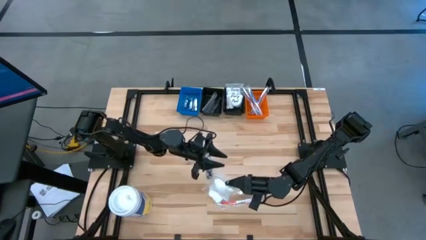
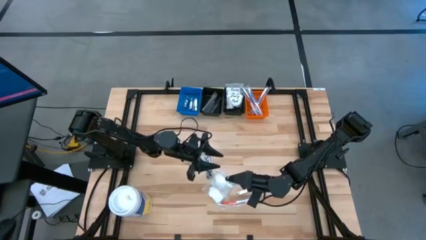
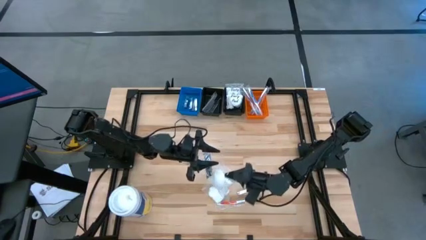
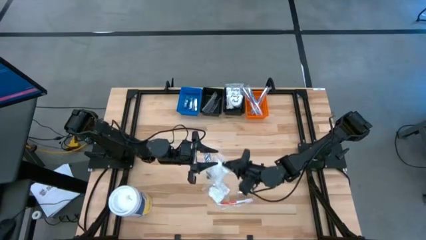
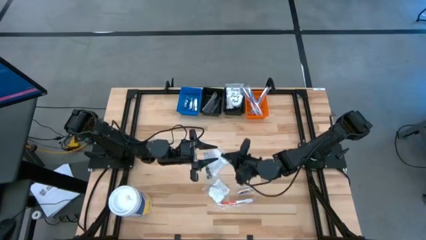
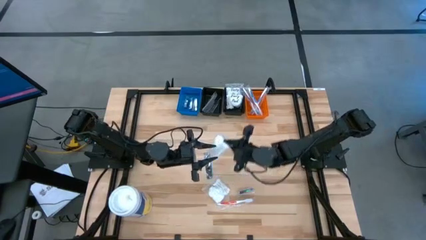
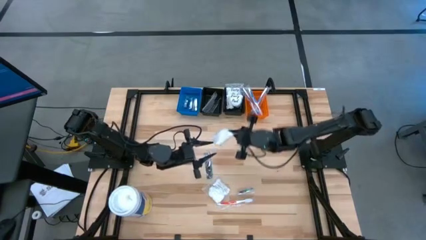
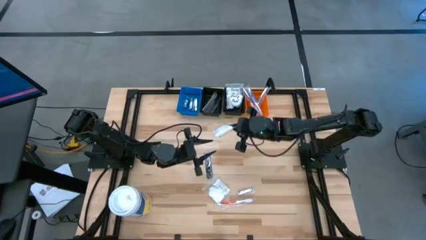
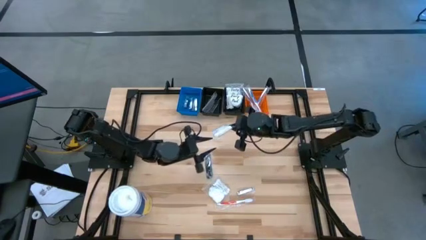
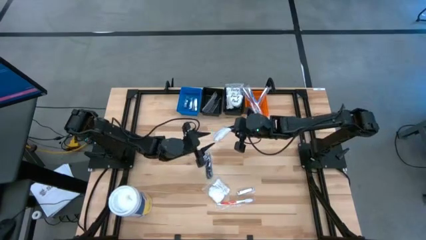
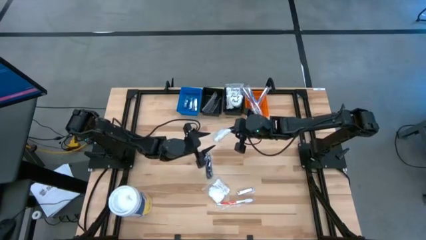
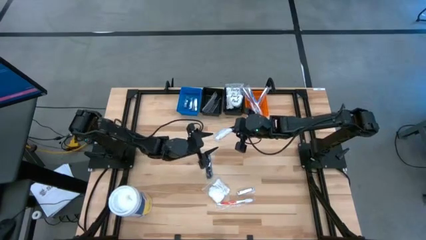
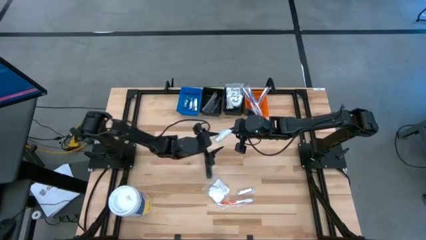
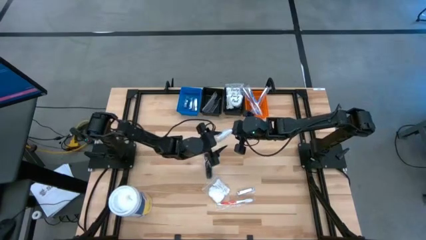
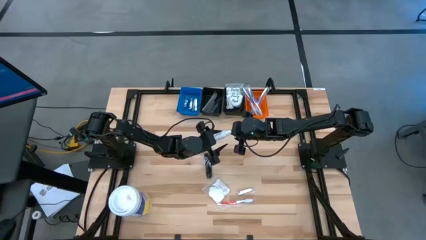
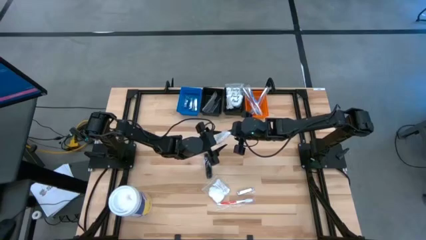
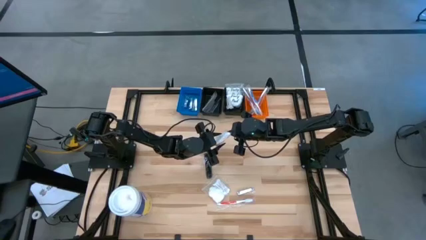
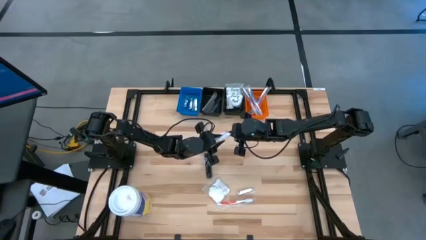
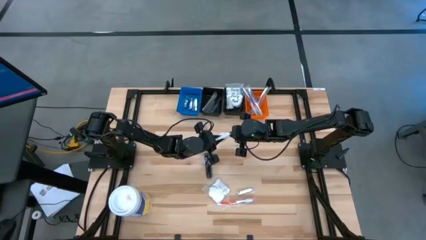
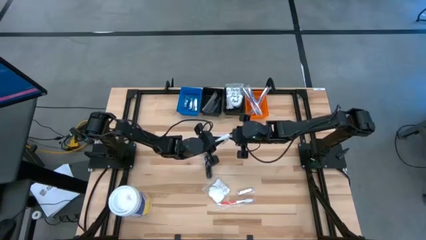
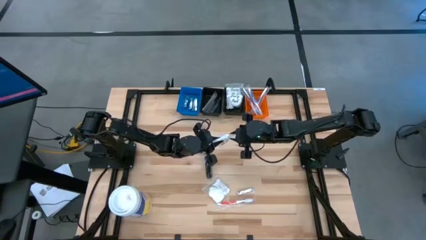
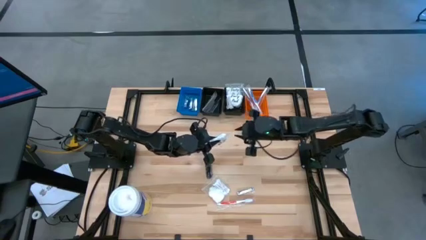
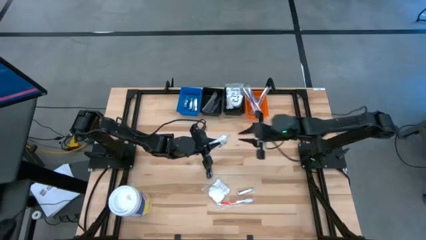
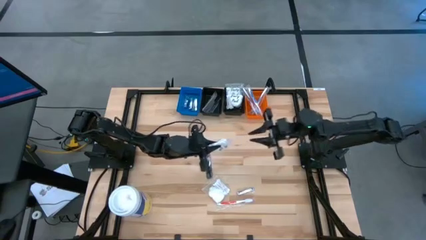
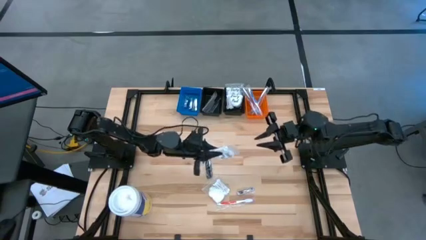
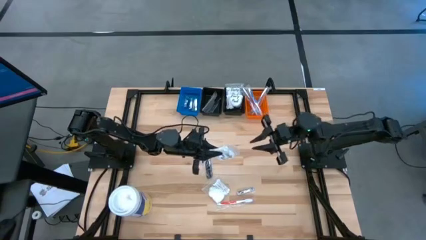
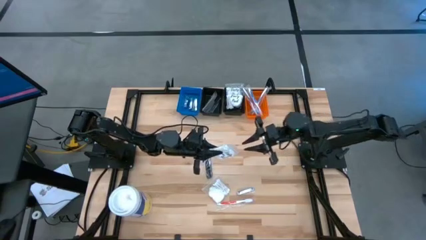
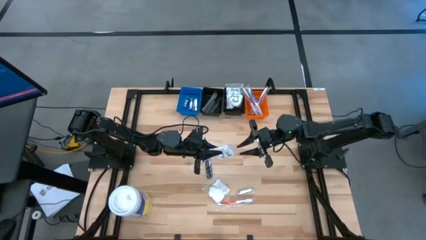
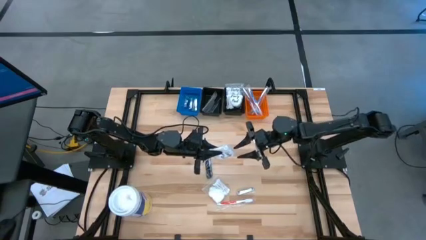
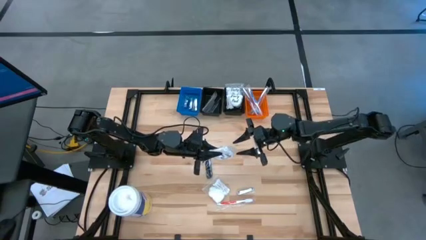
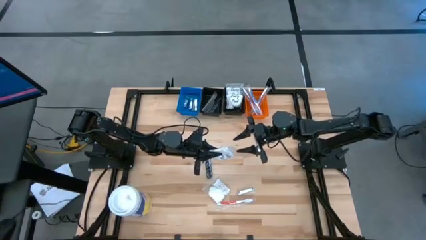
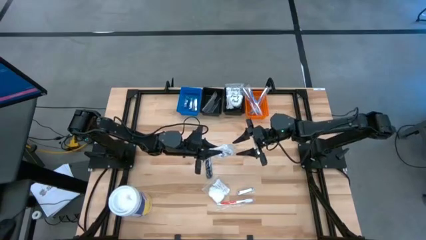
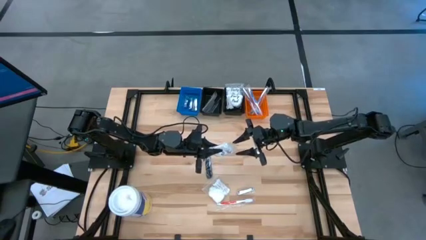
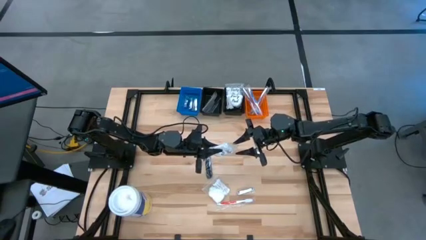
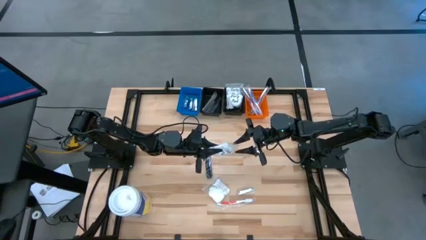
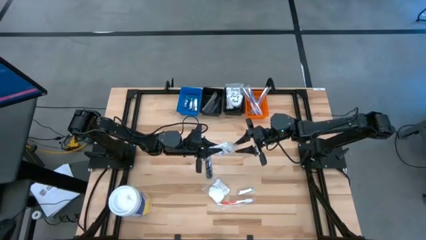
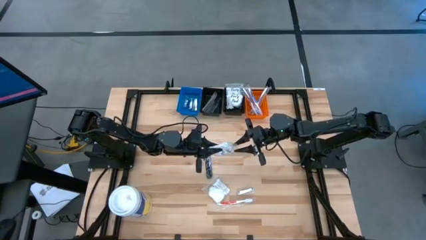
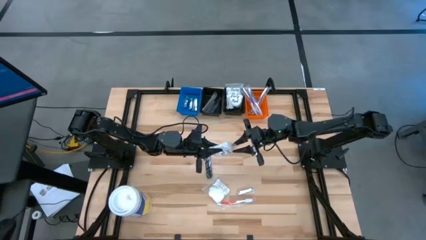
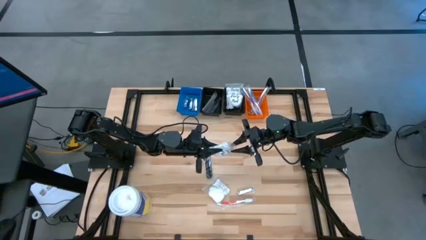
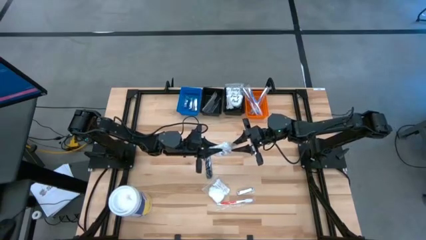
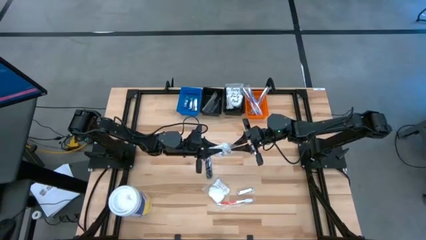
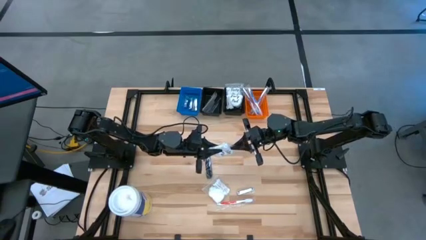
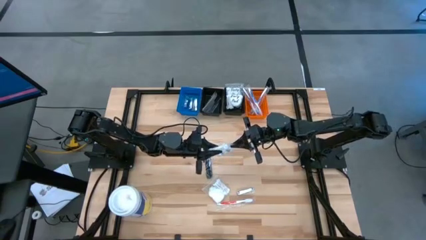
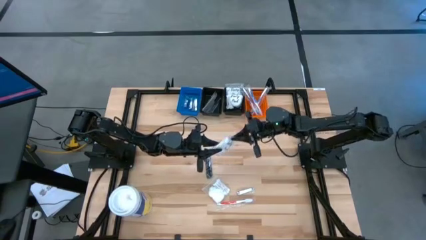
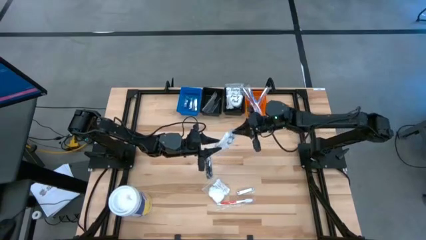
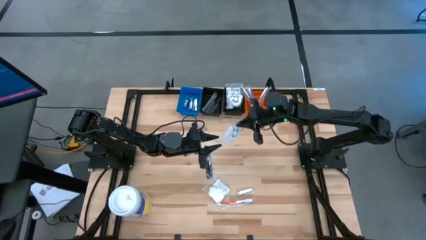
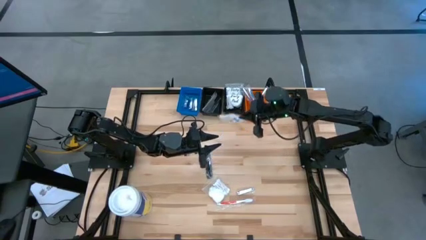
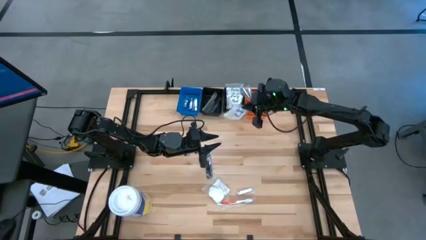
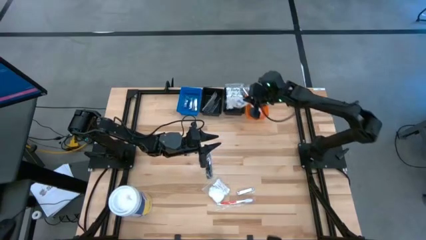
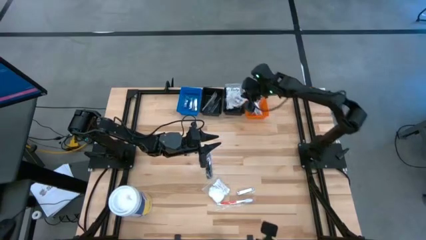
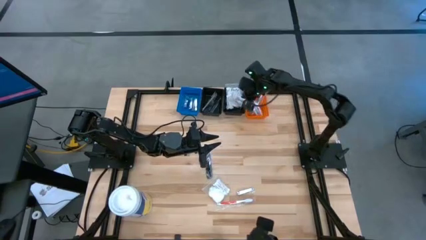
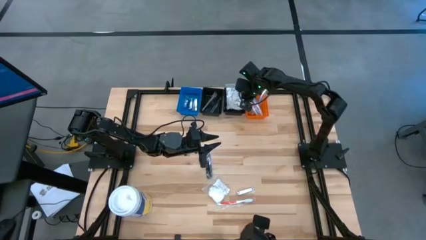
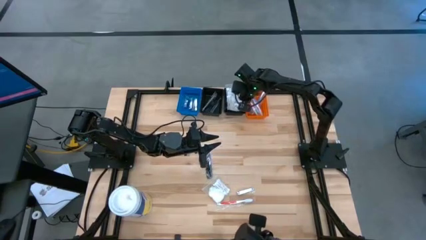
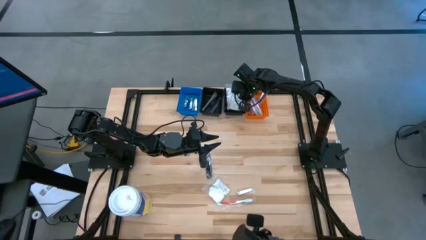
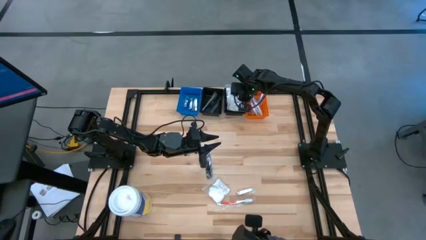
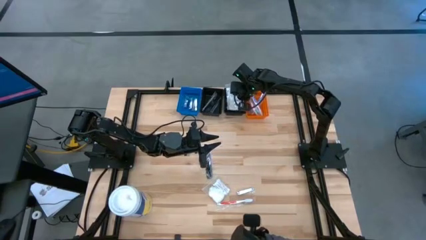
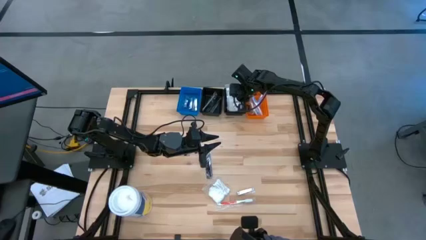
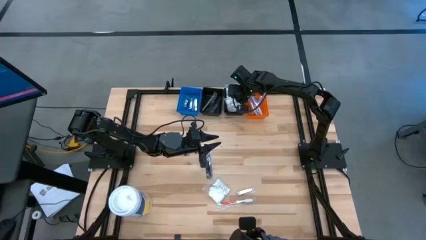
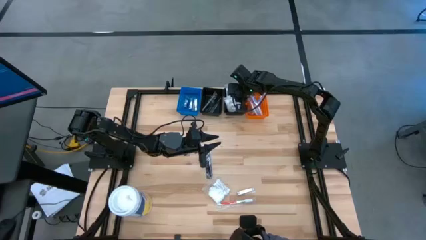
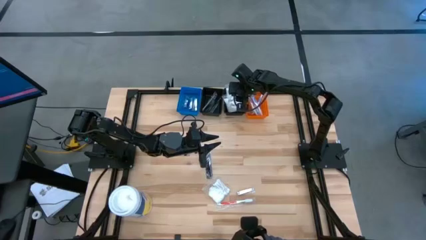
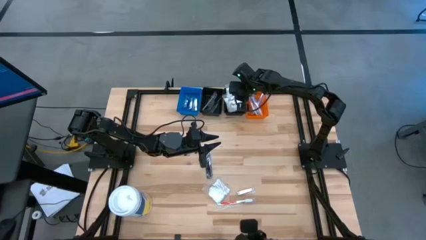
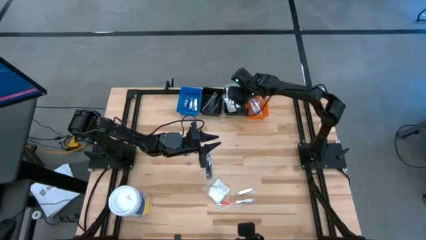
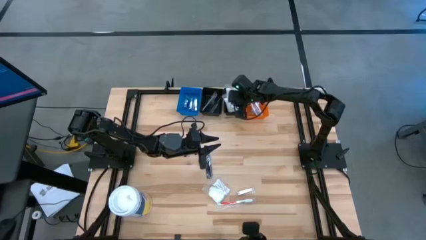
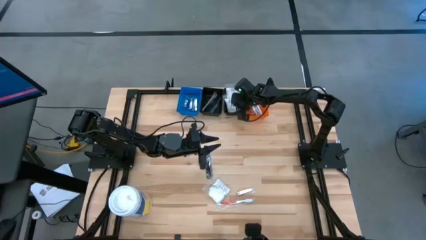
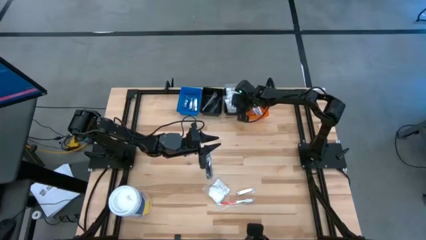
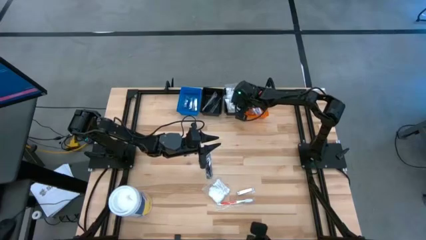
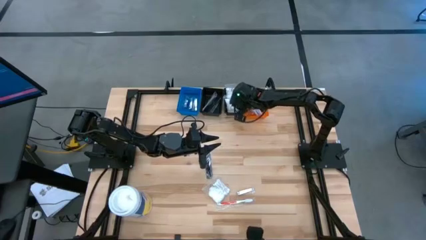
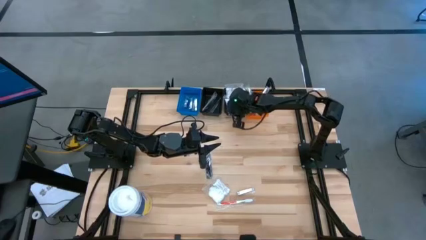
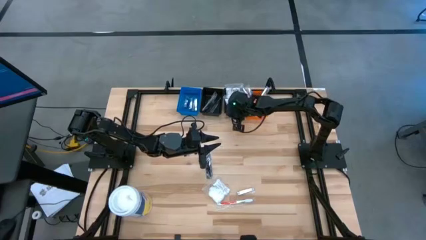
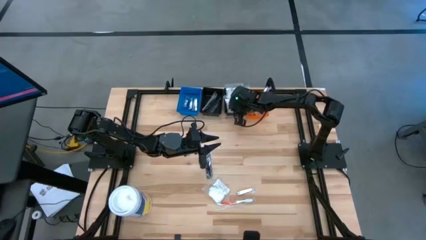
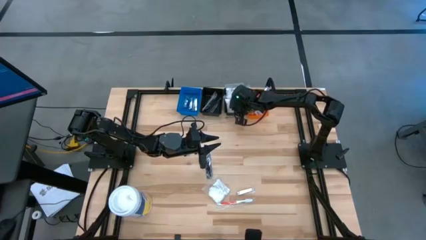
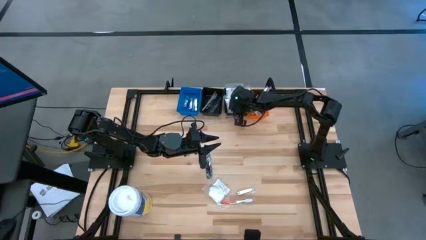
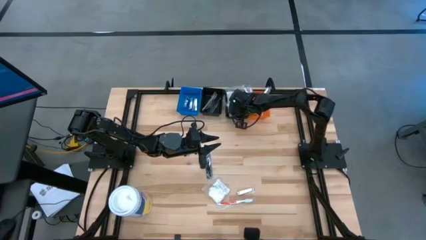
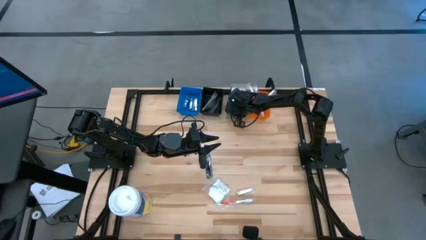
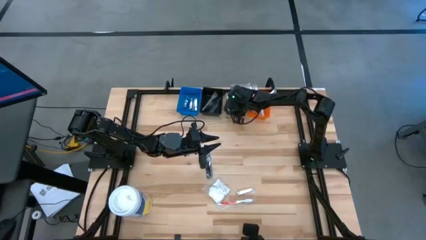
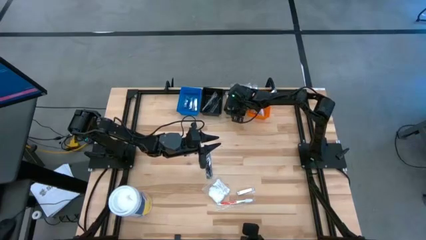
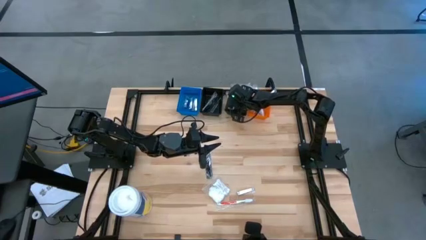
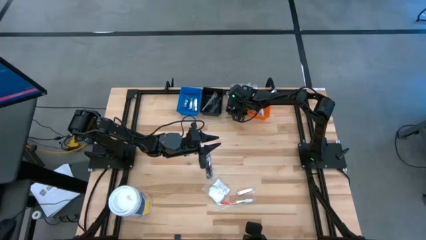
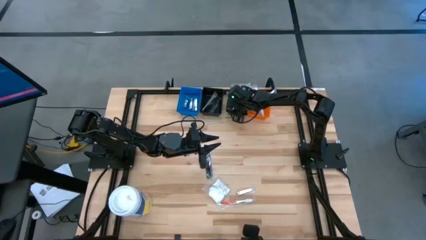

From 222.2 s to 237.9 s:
Task: Pick & Place Travel size toiletries
Put the white vanity pack into the right black bin

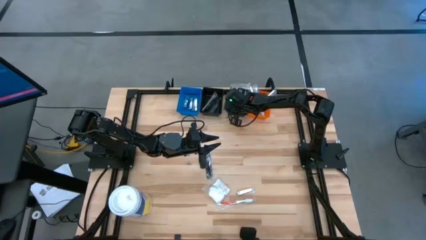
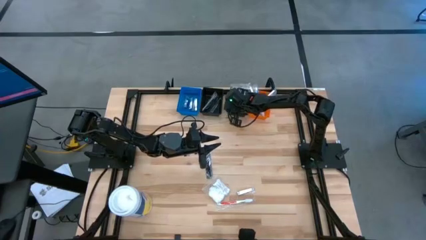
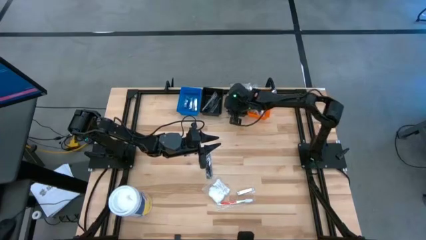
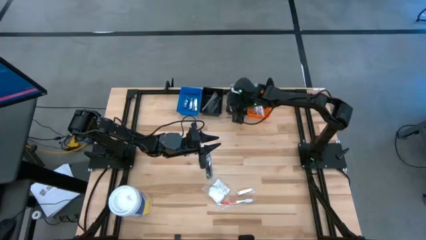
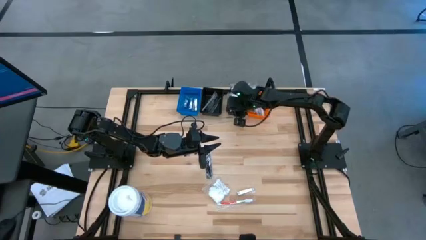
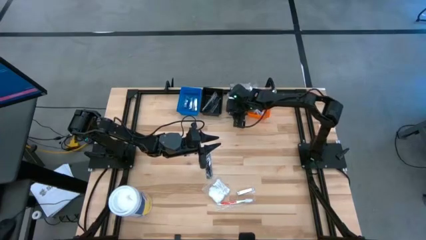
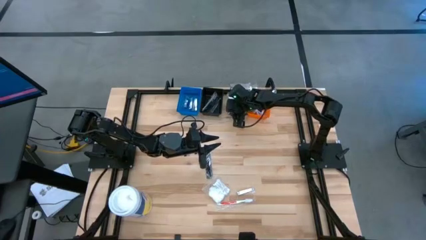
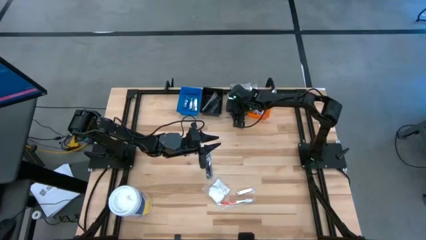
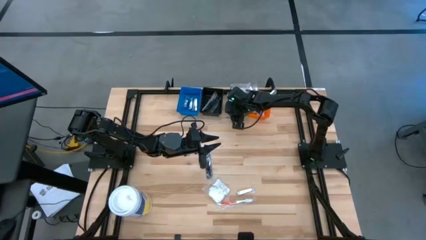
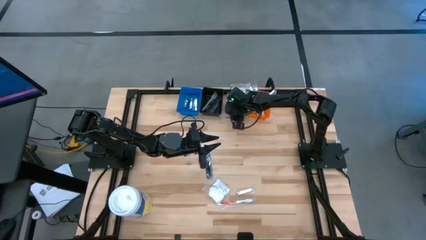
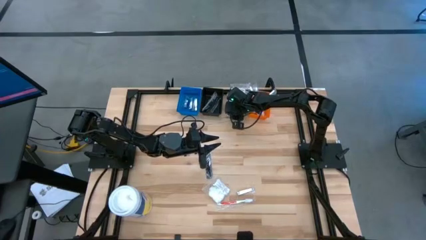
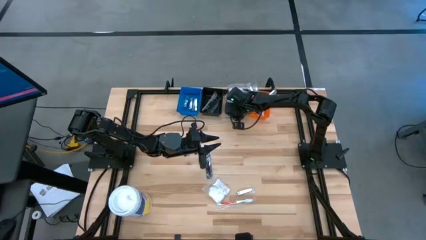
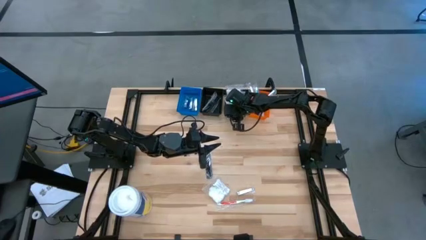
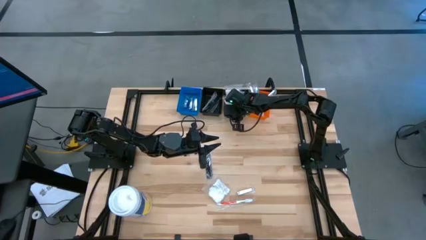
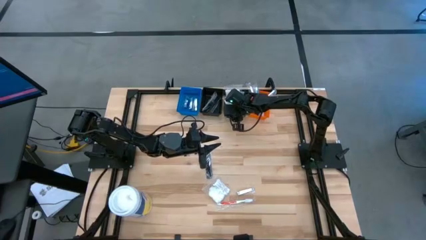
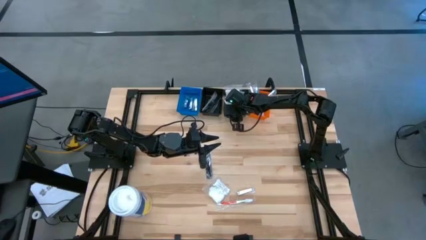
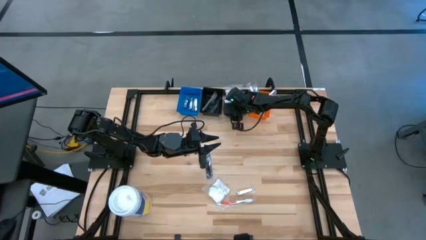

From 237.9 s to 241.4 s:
Adjust the right black bin
